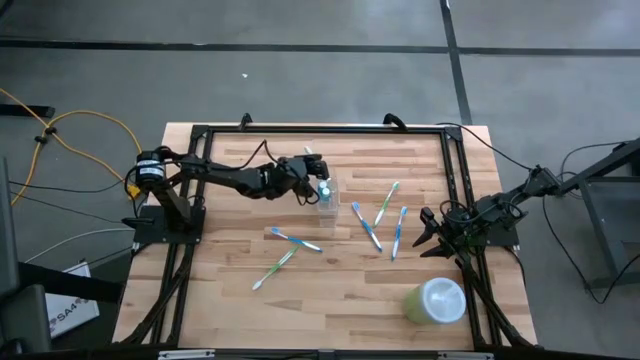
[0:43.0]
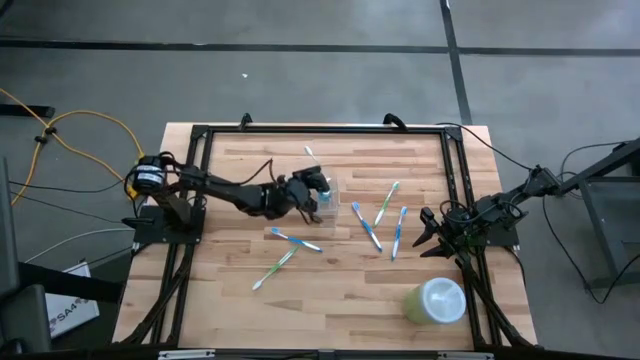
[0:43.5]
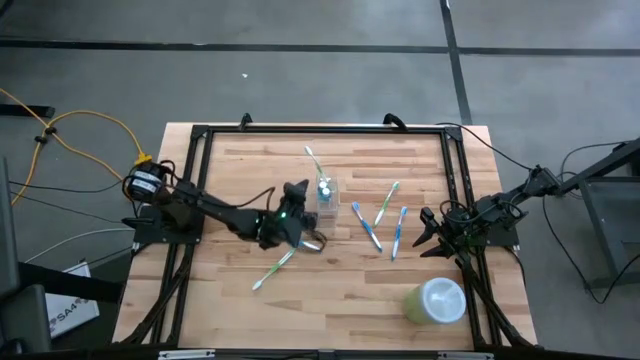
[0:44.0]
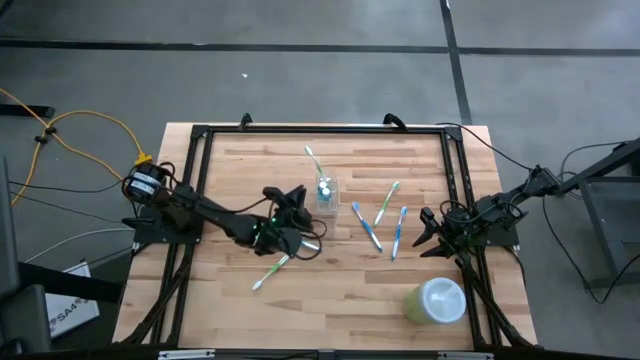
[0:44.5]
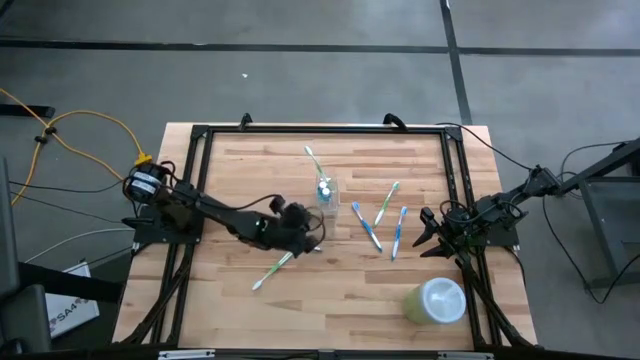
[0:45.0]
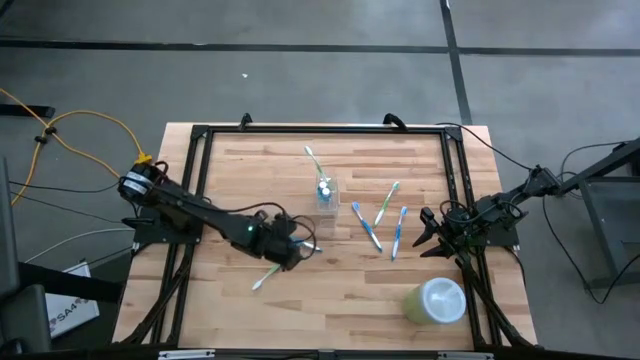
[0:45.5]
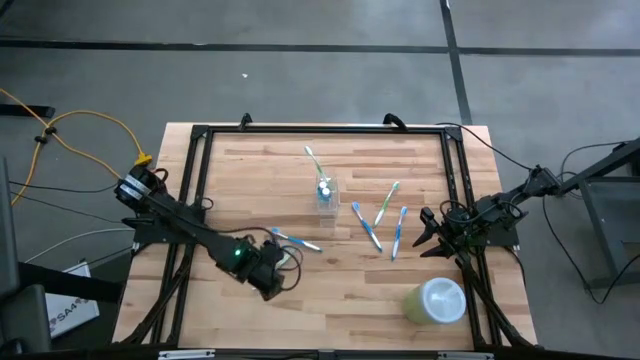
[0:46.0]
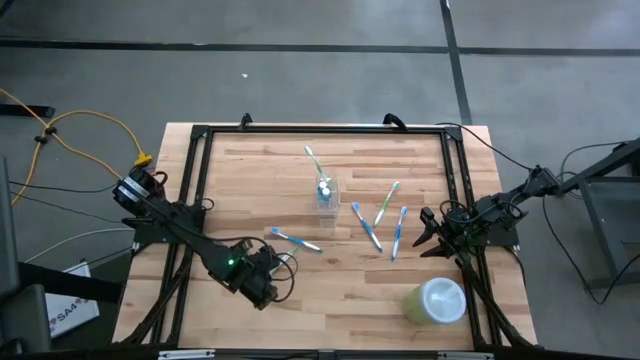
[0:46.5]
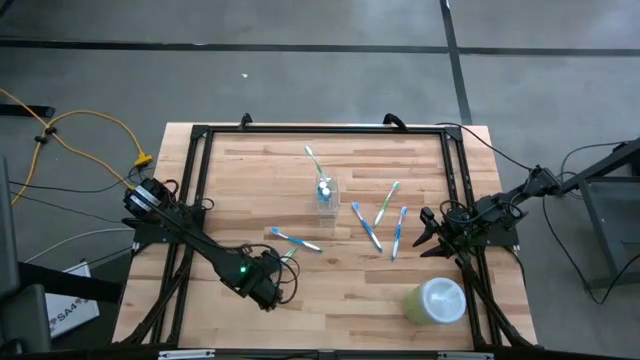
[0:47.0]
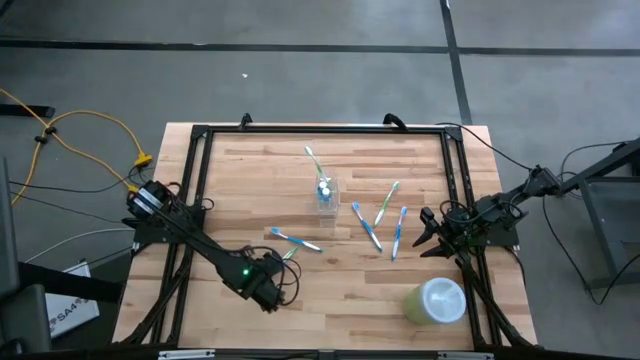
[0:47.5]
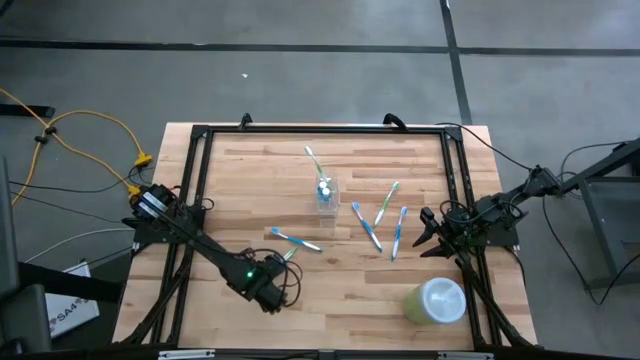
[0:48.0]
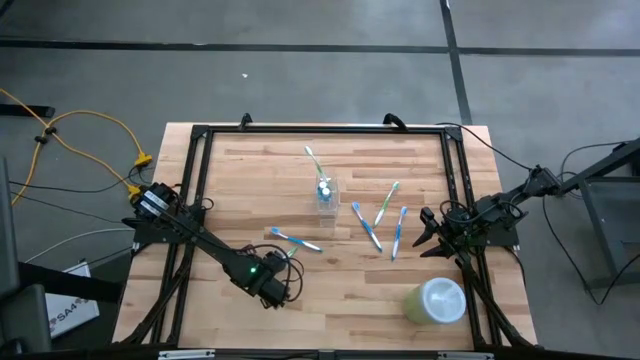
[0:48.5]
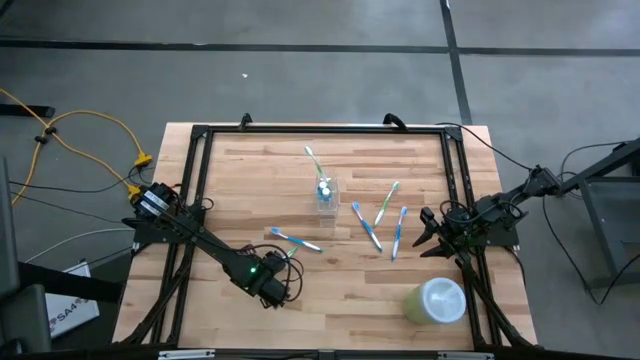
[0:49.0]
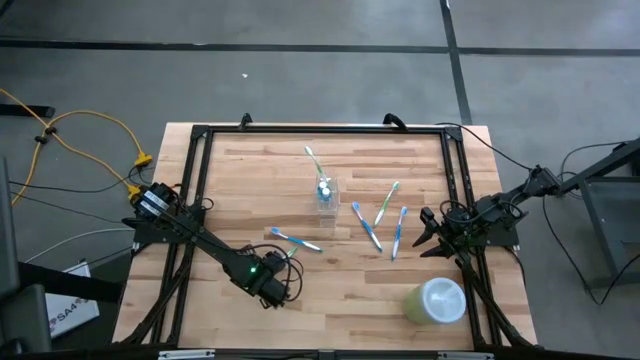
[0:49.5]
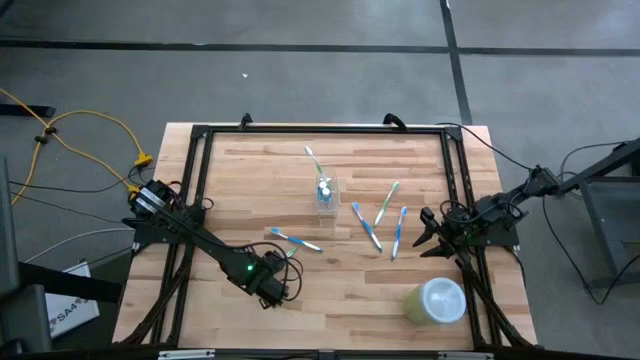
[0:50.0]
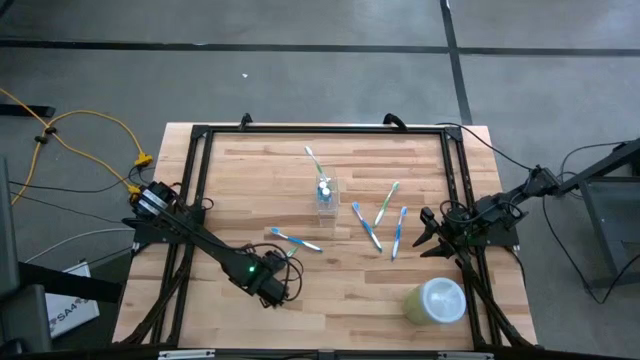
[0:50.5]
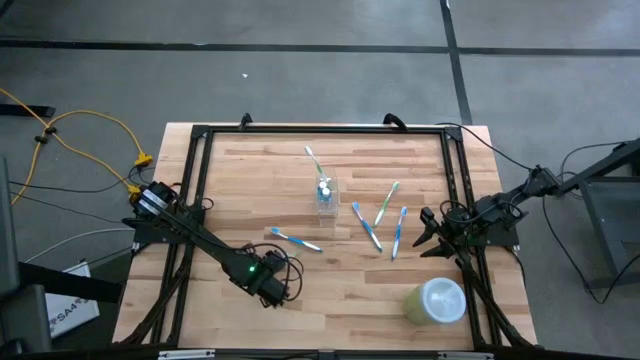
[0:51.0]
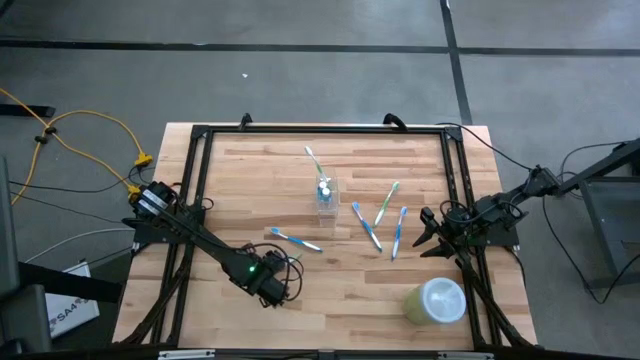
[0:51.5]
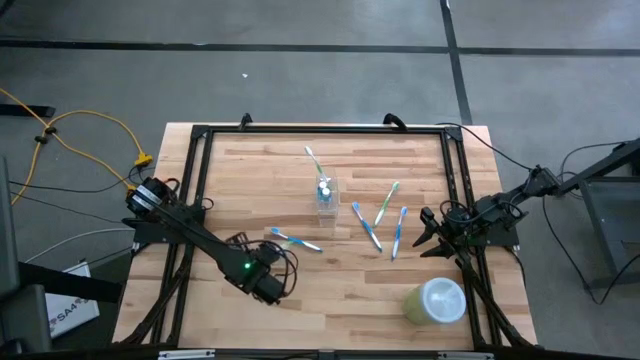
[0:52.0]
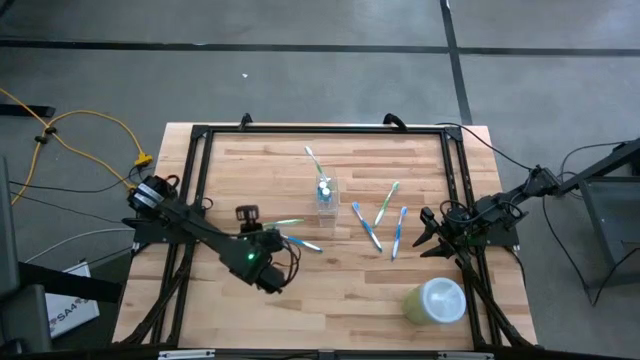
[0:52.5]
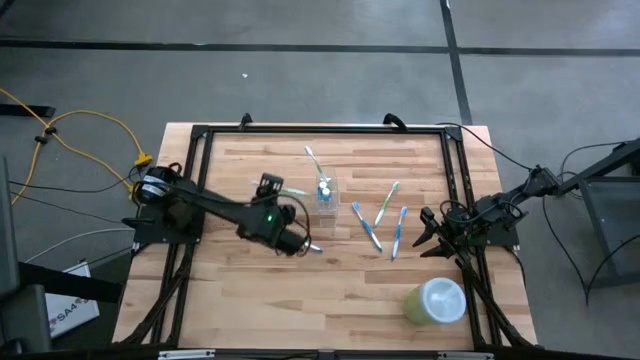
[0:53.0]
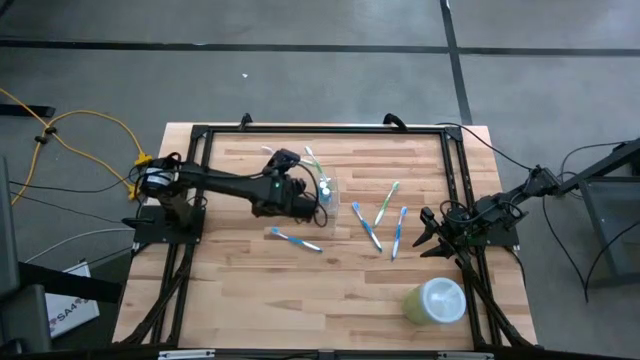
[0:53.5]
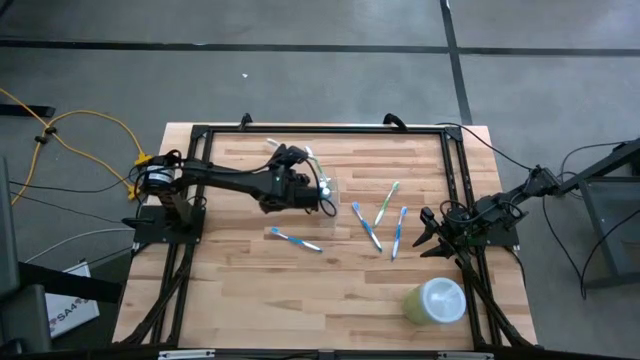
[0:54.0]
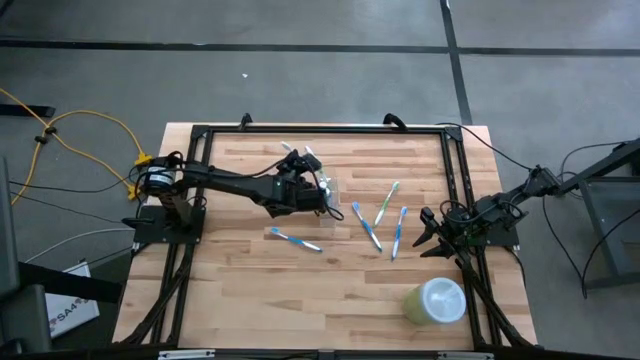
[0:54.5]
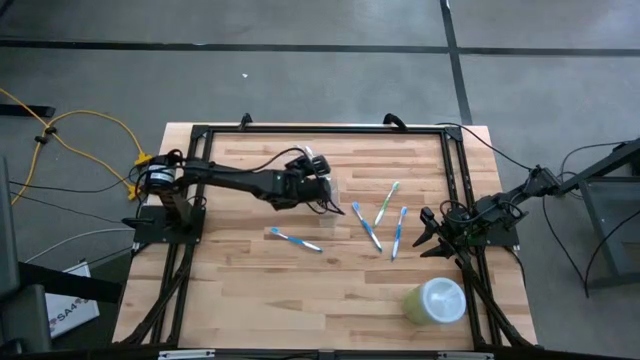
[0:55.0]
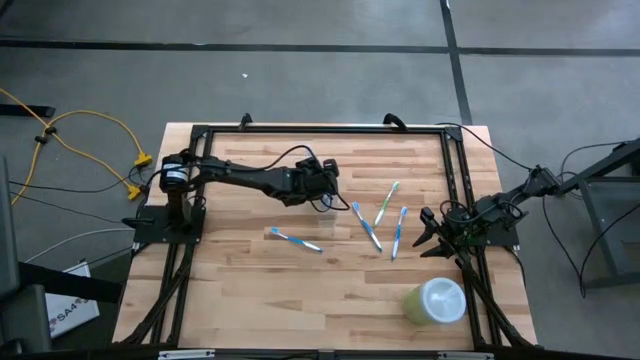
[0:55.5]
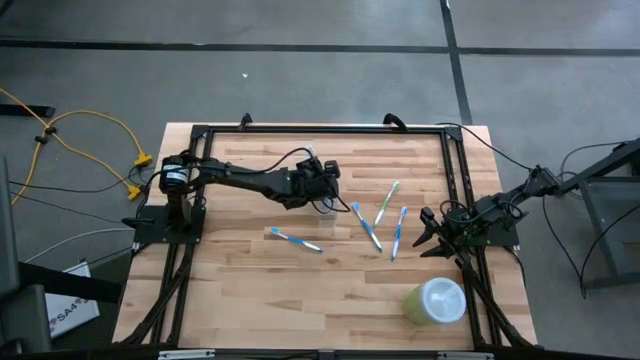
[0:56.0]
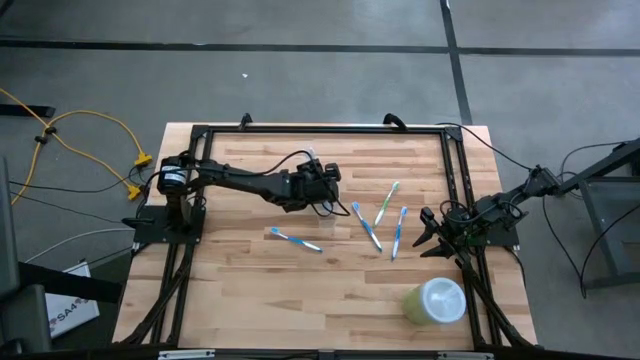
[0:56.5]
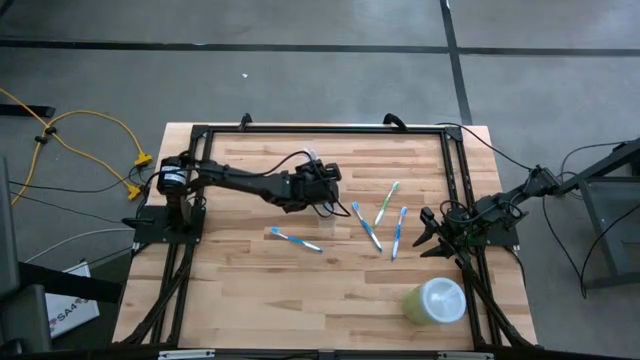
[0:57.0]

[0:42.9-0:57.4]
Task: Pick & Place toothbrushing station
Put the bottom green toothbrush into the transparent organizer

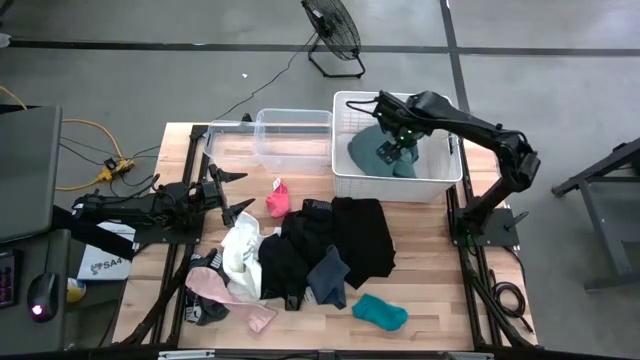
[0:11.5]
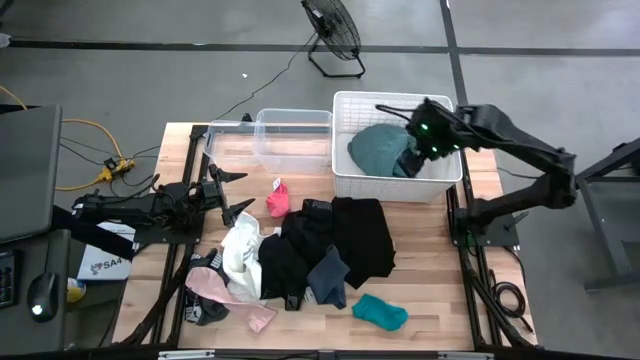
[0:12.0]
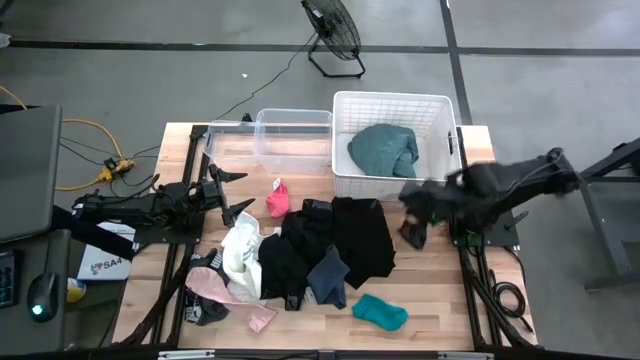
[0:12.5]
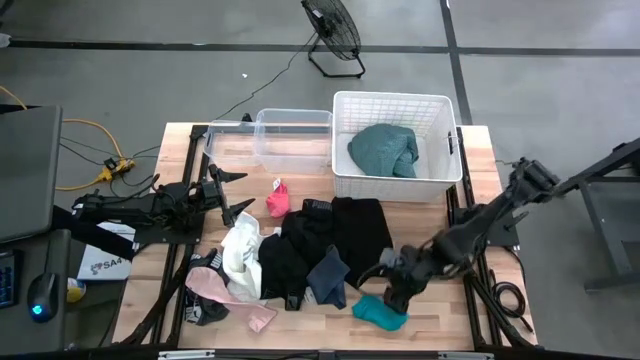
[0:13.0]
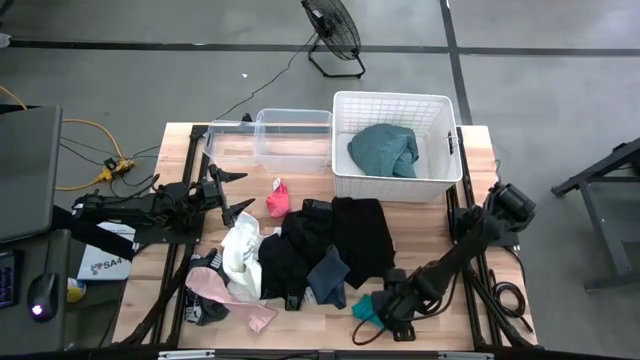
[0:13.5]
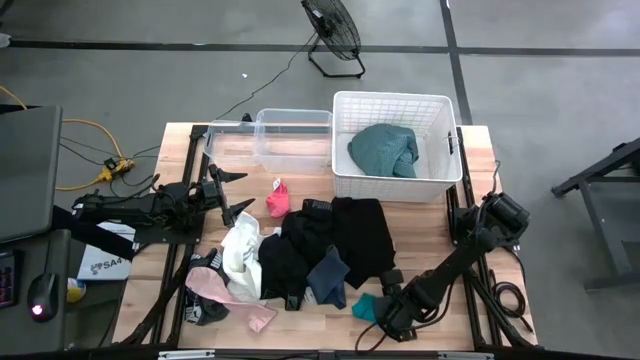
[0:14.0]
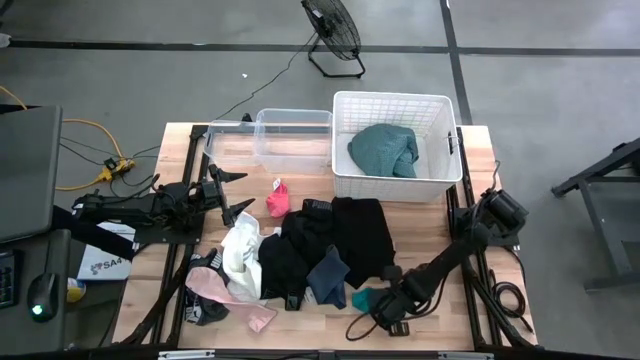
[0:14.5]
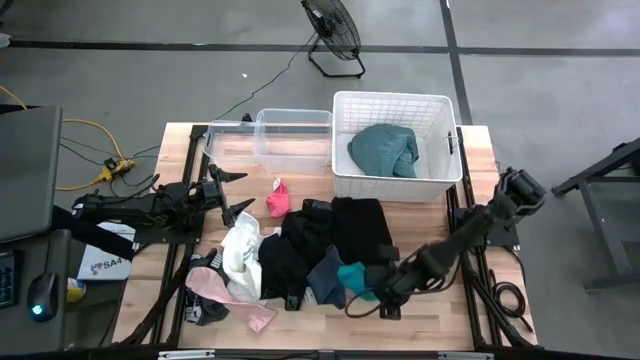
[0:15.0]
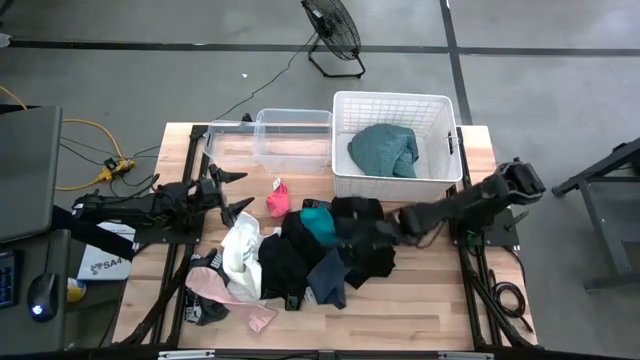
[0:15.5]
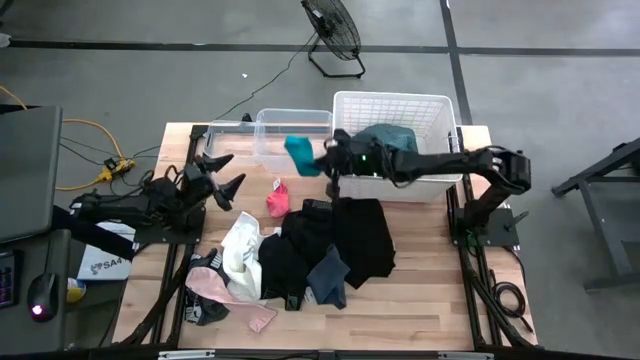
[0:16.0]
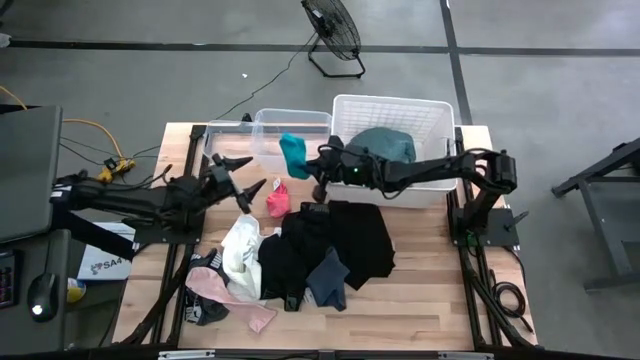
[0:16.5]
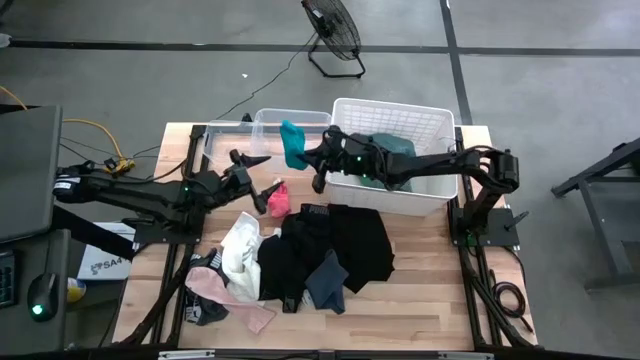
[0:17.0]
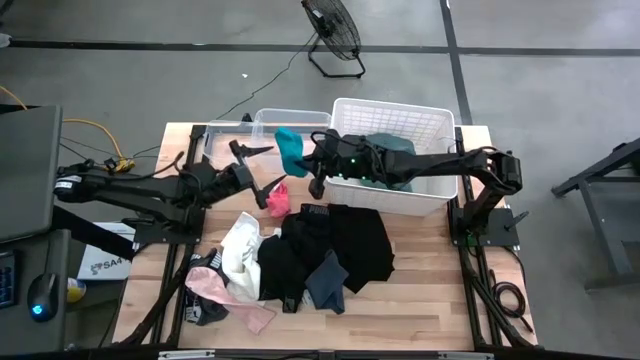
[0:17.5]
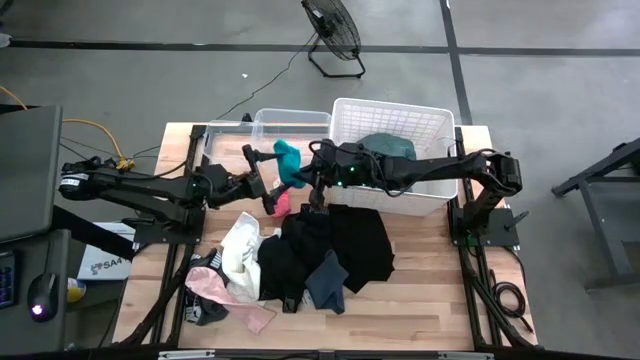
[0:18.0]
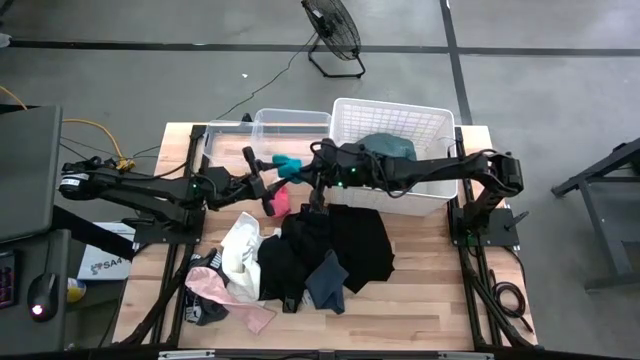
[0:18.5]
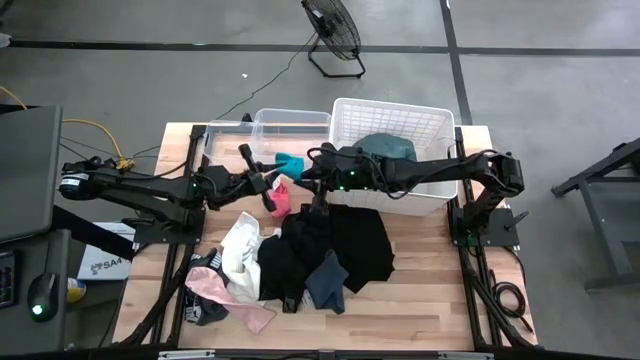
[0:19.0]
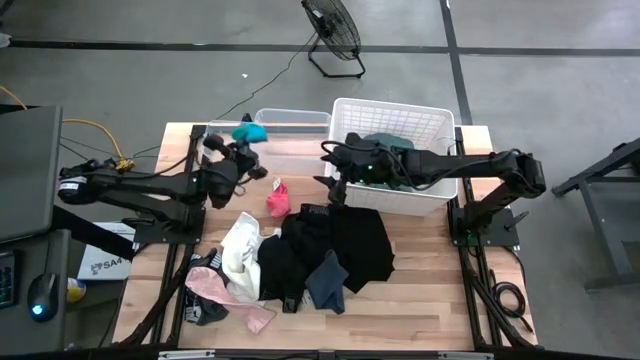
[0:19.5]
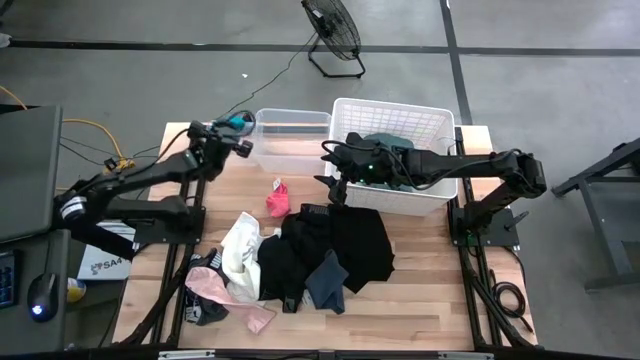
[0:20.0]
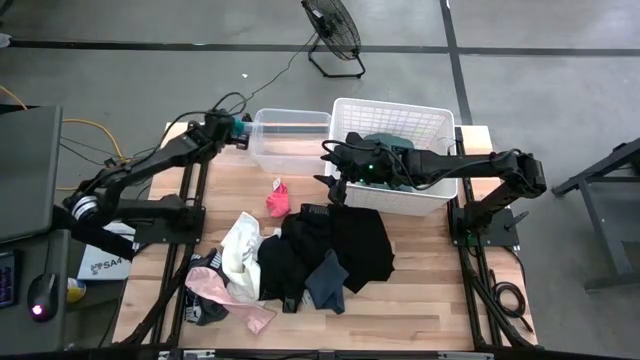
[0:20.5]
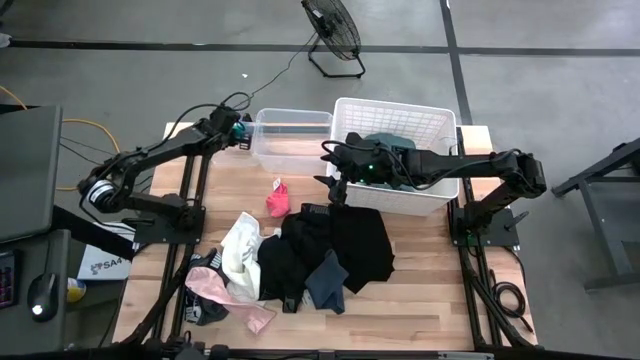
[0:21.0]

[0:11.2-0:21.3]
Task: Pick & Place Cloths
Put the blue sock into the left transparent bin
